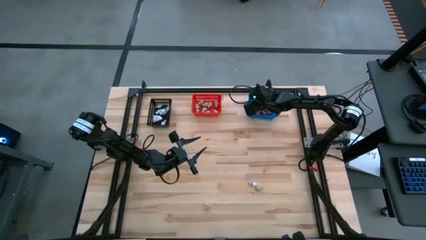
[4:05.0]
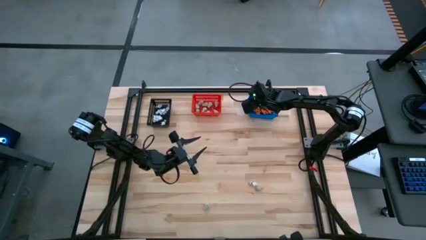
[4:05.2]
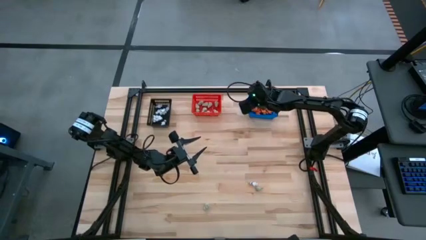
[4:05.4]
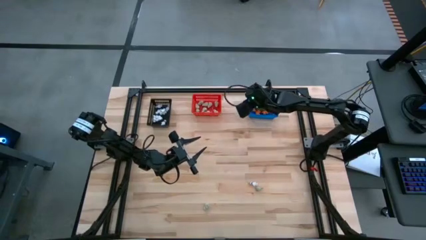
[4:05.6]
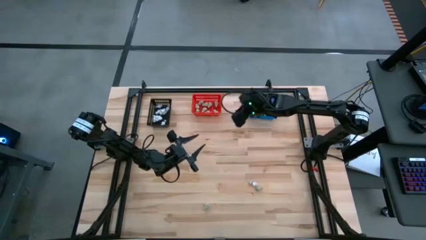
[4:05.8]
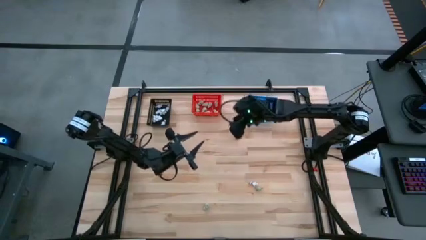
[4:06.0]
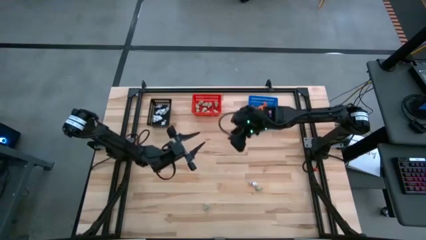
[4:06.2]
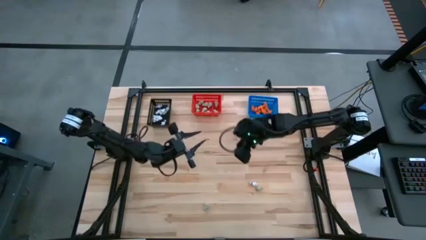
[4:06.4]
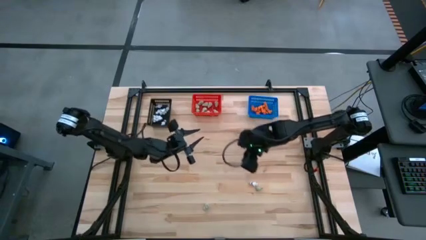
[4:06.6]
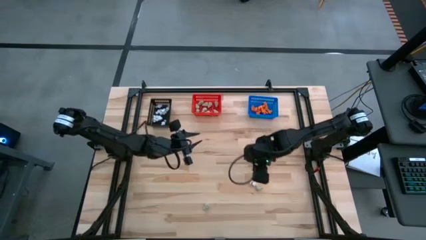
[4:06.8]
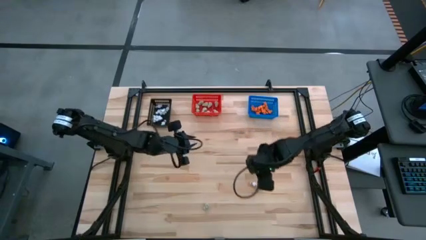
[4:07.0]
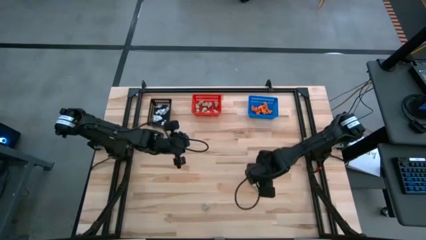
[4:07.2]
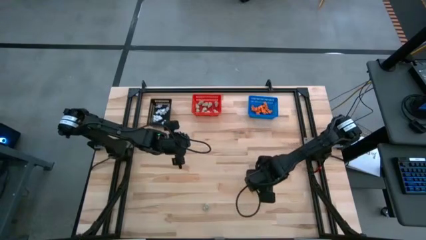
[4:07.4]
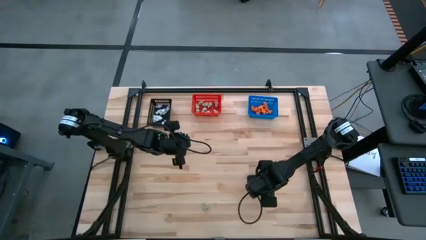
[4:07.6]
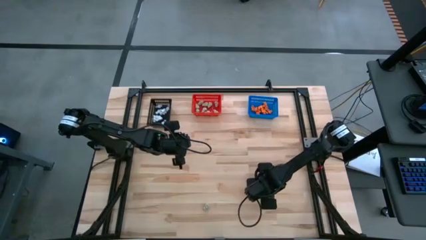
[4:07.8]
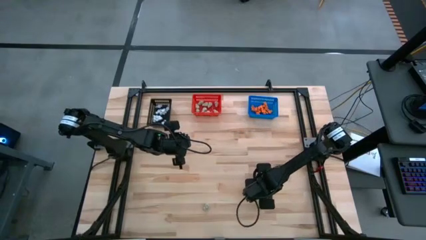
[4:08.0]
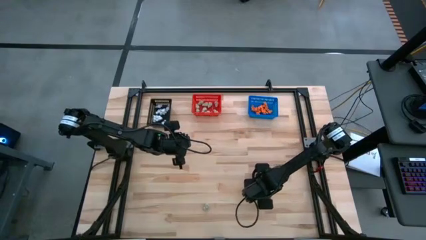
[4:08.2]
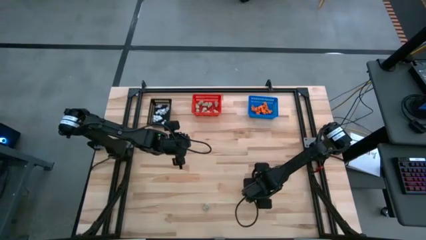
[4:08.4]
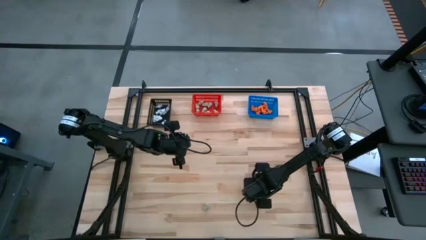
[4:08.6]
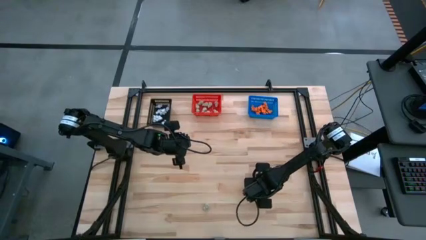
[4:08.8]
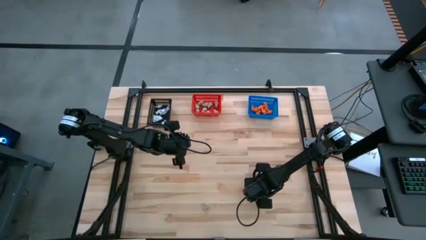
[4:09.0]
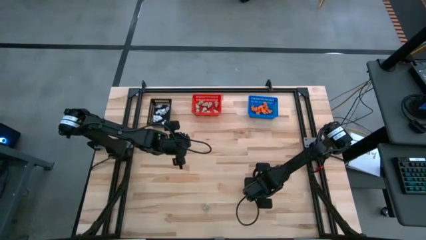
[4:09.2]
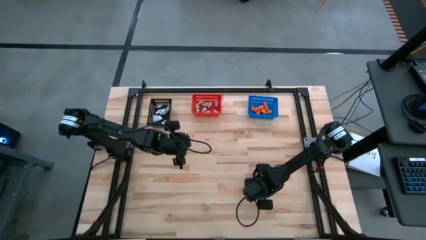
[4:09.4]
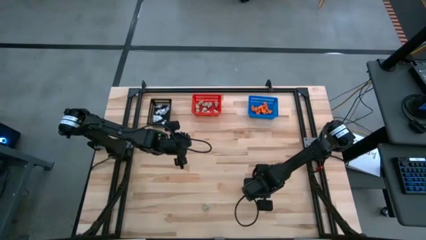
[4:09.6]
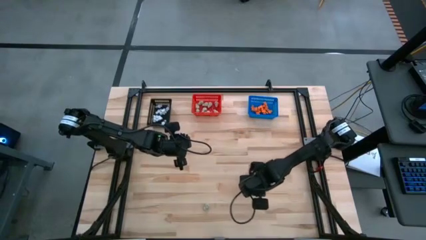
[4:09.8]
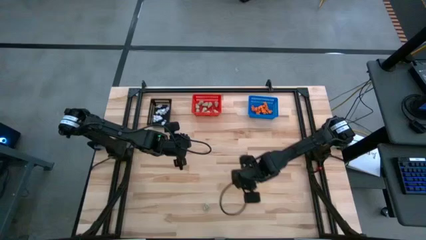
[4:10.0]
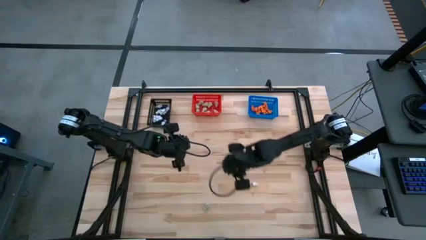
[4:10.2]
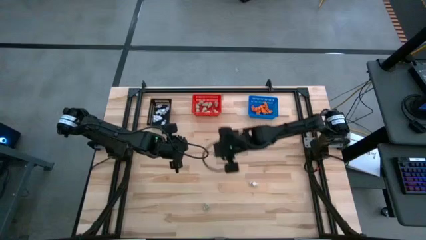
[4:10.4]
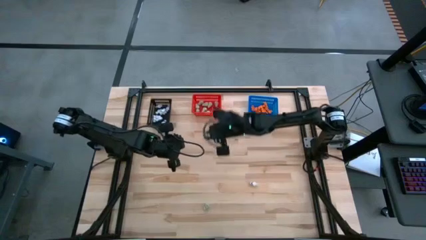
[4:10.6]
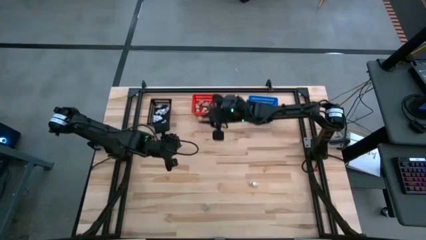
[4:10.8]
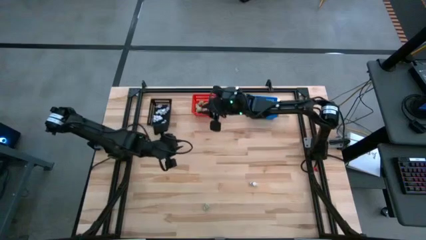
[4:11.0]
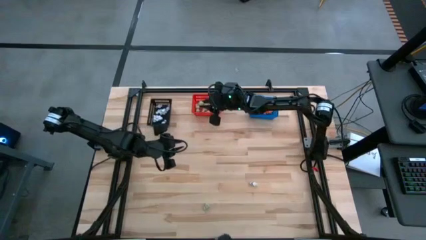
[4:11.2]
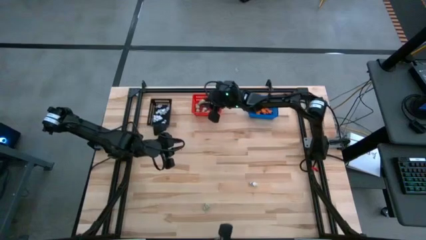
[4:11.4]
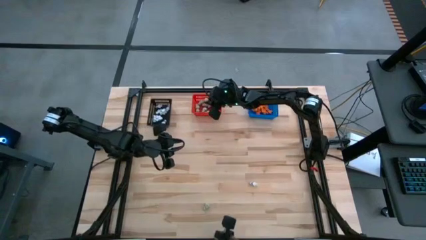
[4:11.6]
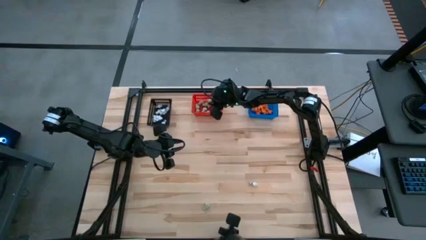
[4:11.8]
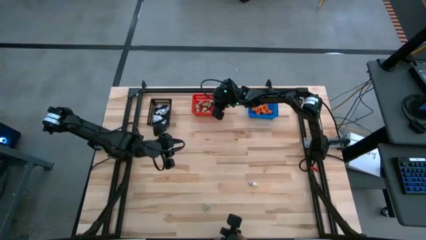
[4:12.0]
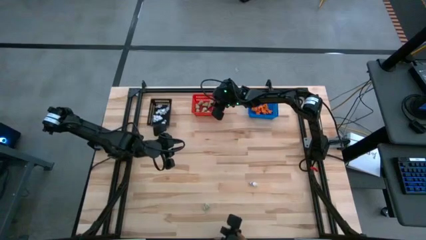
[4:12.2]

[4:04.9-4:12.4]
Task: Sort Halloween decoration
Put the white skull toy into the red bin

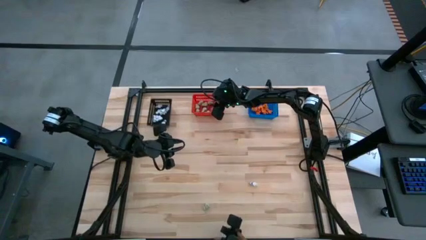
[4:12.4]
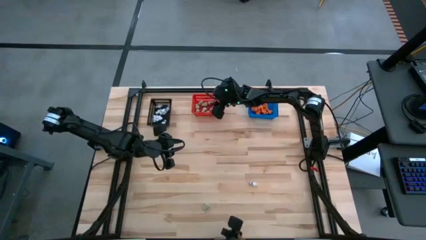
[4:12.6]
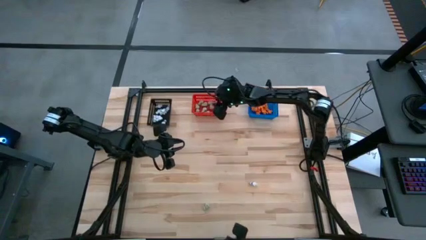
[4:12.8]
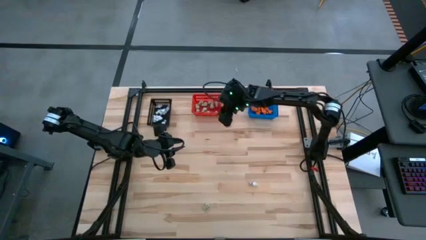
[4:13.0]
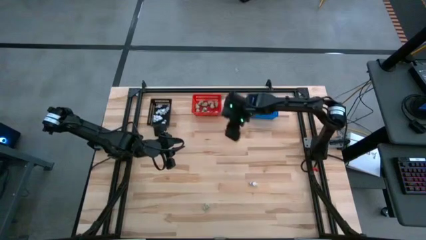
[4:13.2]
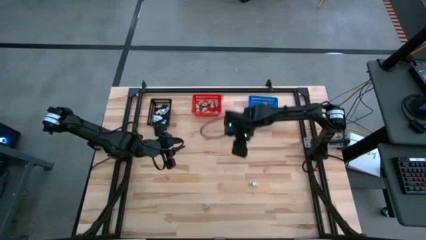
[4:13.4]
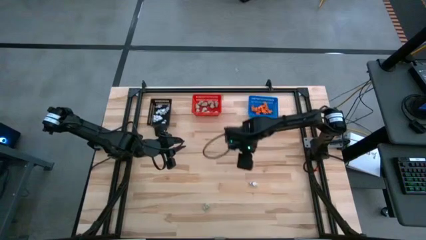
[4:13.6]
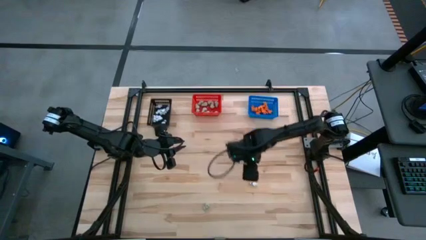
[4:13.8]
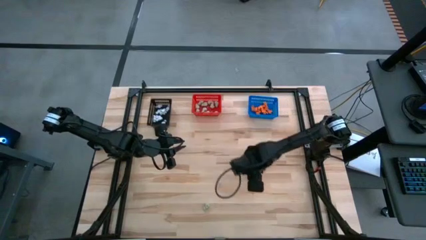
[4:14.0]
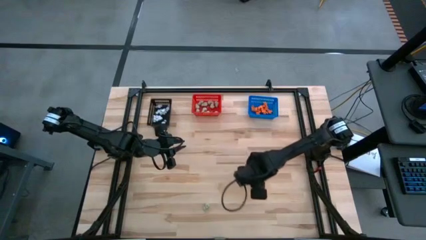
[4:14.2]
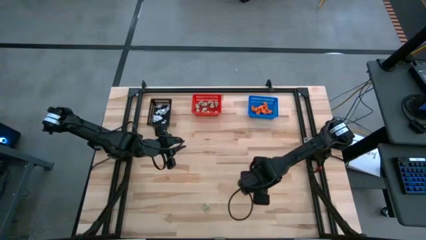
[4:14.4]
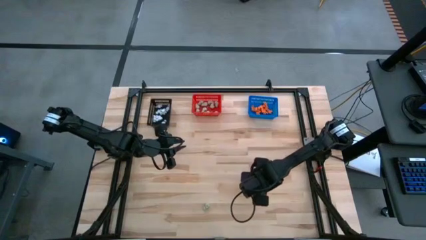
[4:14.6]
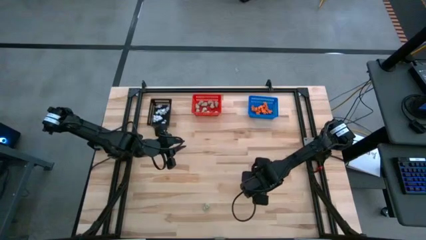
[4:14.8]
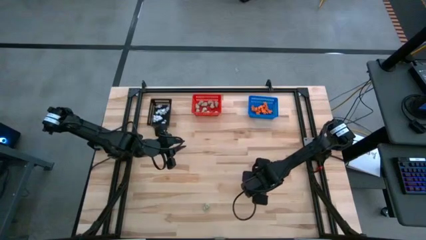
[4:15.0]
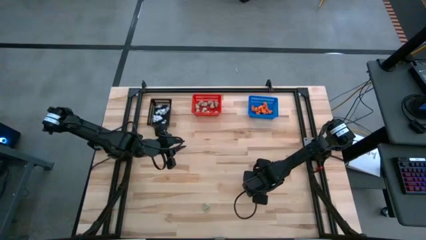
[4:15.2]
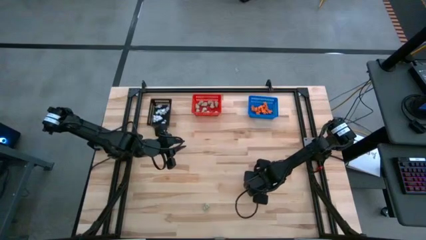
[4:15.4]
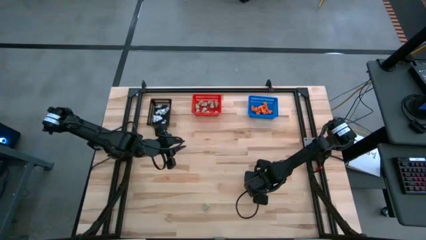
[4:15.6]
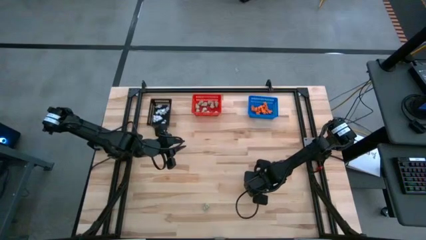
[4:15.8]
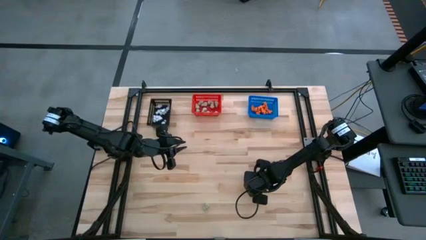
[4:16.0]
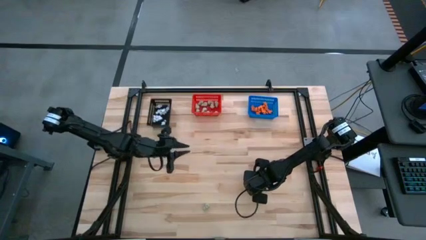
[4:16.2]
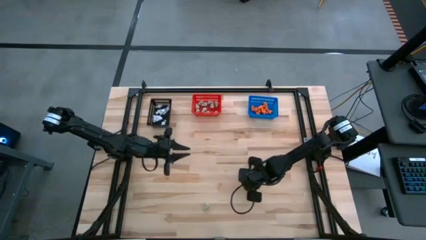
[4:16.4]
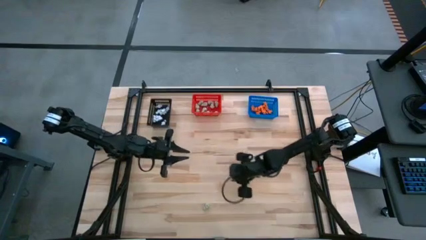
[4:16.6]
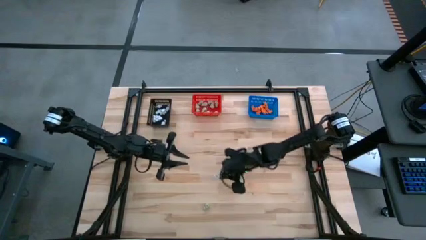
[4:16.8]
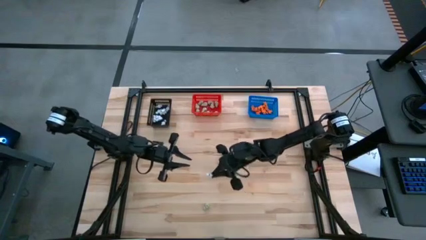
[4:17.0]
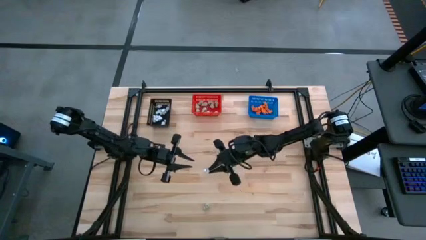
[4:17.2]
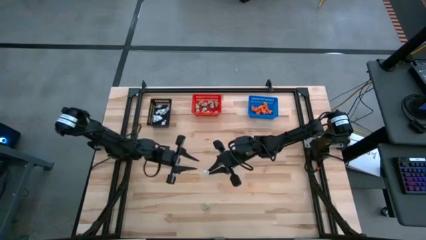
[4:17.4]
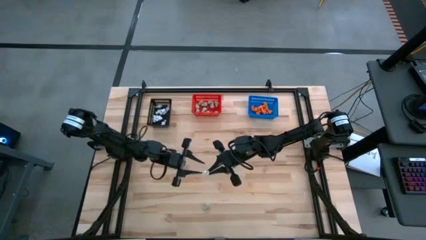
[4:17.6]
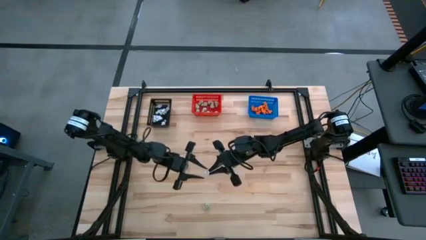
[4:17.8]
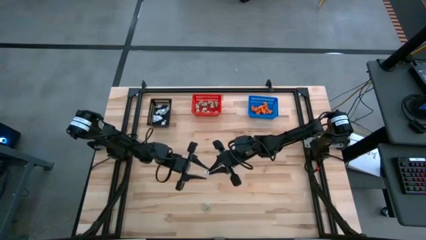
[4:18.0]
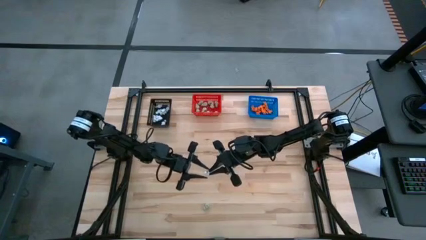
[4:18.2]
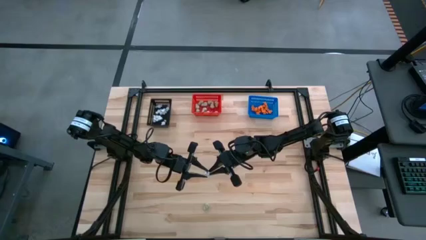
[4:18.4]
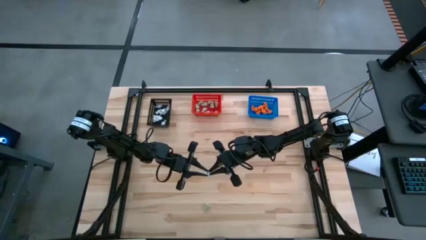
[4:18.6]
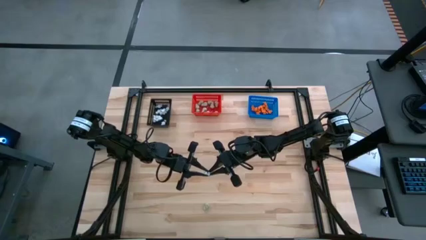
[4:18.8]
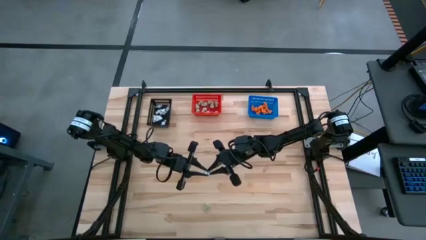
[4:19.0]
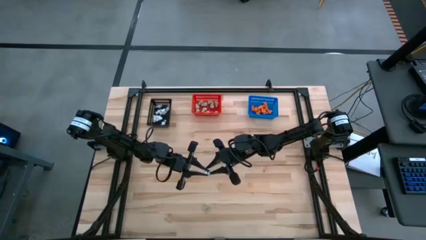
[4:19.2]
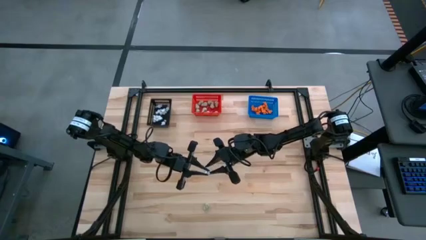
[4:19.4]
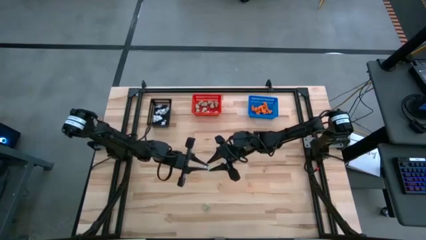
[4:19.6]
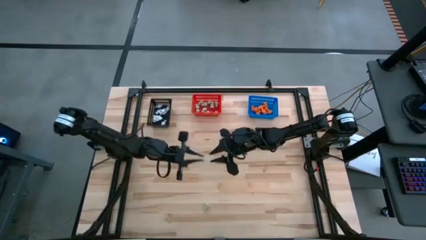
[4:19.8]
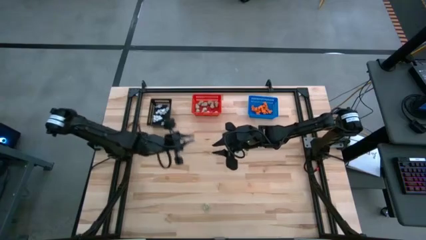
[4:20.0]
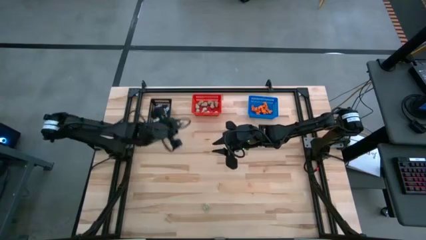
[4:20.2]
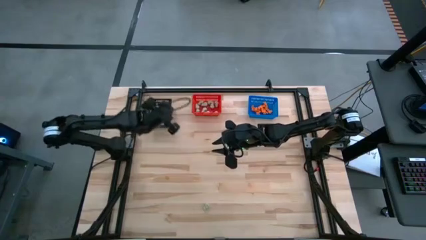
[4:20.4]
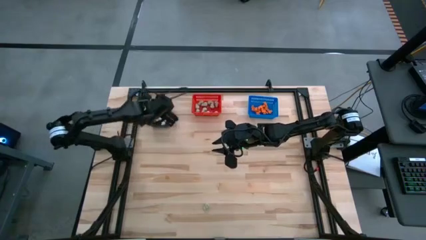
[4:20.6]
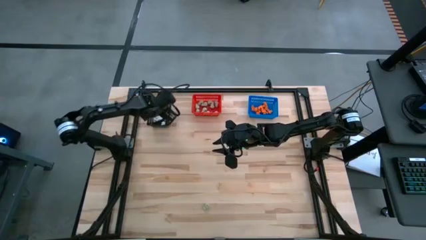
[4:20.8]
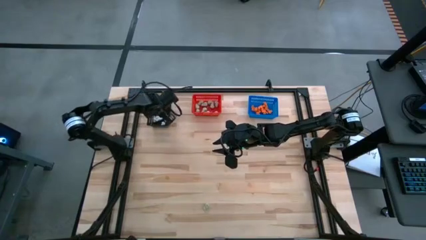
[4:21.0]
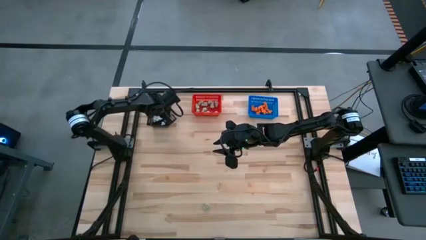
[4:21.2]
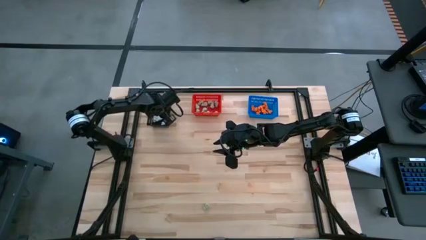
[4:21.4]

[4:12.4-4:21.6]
Put the white skeleton toy into the black bin
